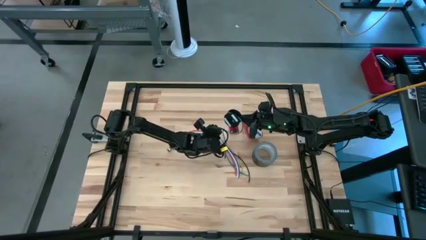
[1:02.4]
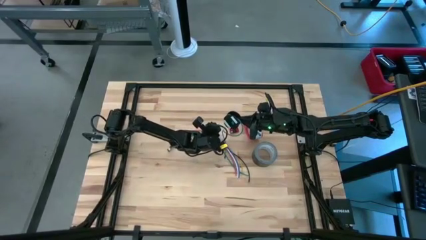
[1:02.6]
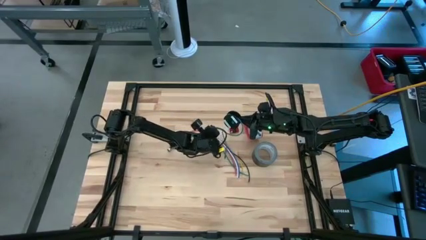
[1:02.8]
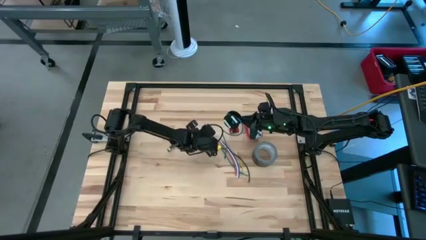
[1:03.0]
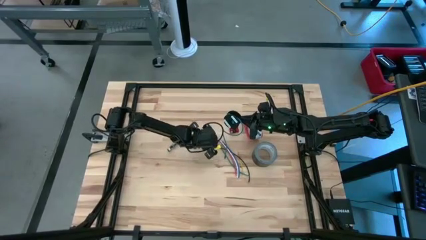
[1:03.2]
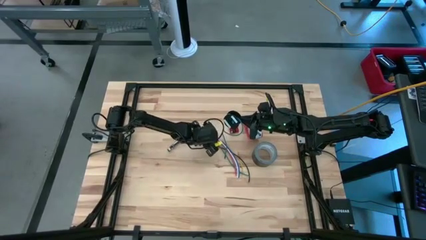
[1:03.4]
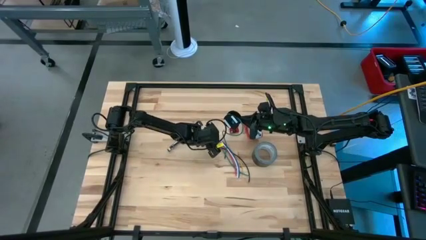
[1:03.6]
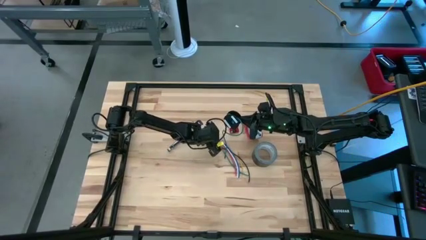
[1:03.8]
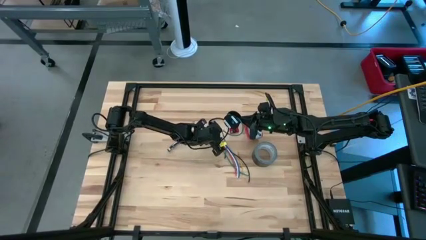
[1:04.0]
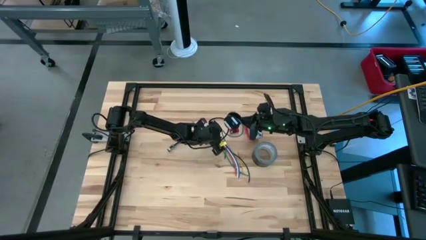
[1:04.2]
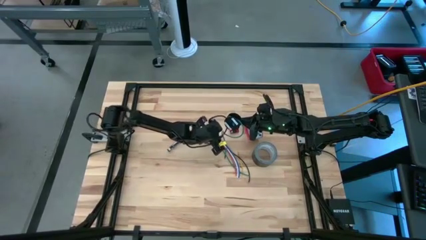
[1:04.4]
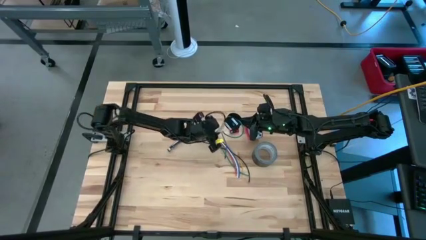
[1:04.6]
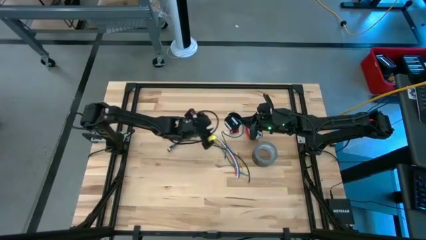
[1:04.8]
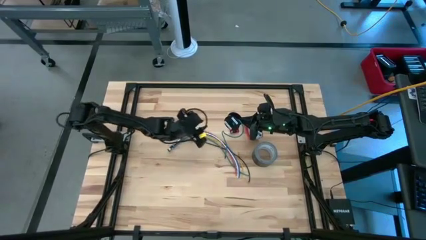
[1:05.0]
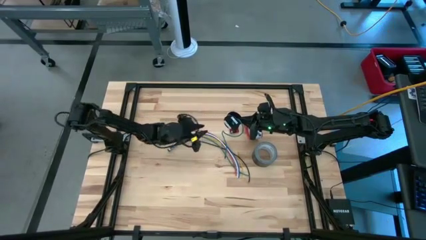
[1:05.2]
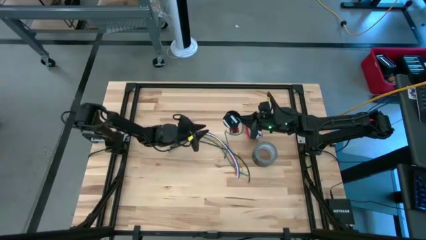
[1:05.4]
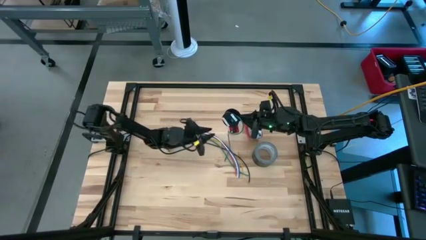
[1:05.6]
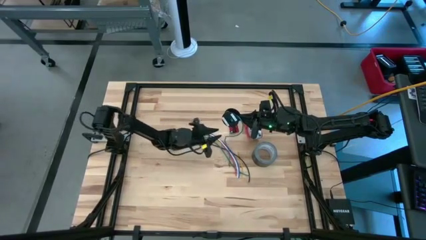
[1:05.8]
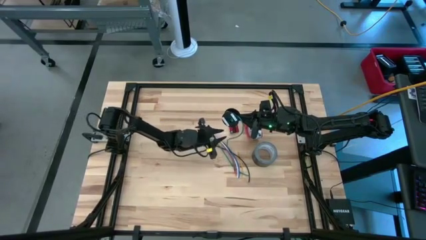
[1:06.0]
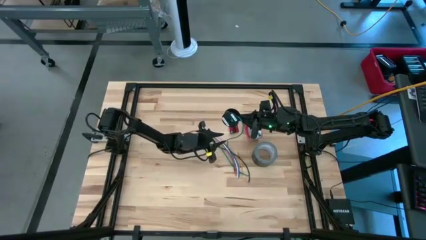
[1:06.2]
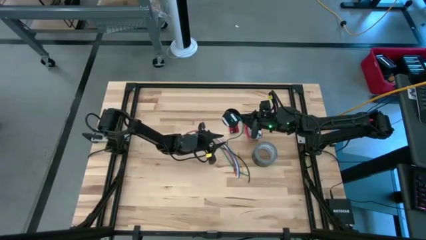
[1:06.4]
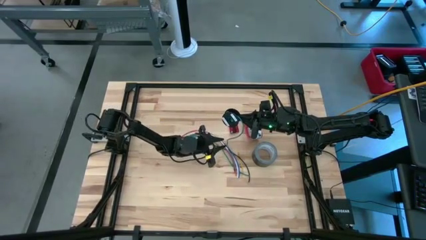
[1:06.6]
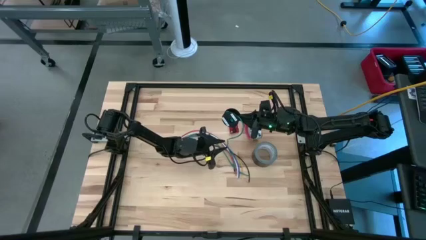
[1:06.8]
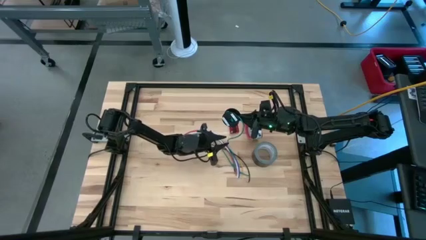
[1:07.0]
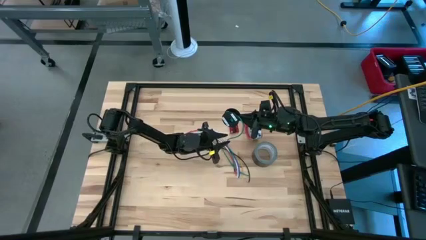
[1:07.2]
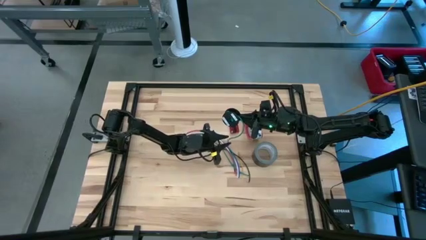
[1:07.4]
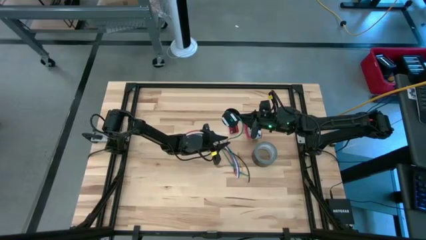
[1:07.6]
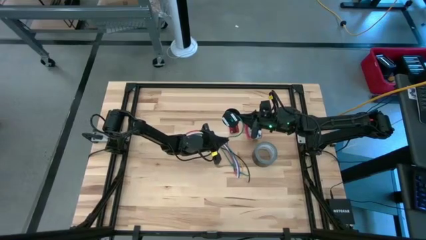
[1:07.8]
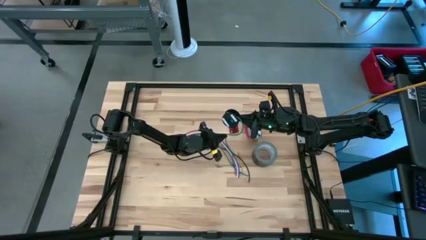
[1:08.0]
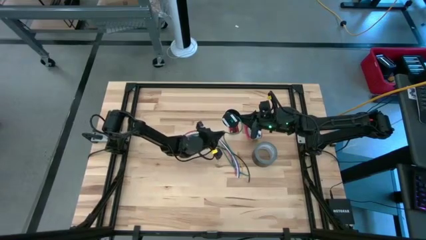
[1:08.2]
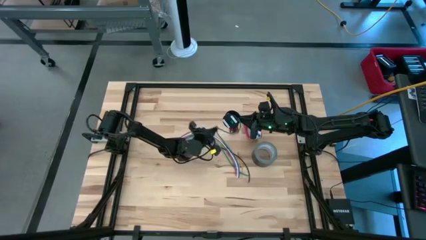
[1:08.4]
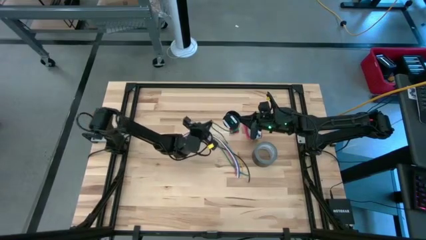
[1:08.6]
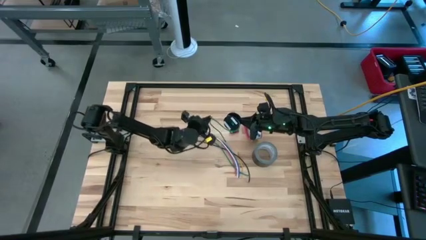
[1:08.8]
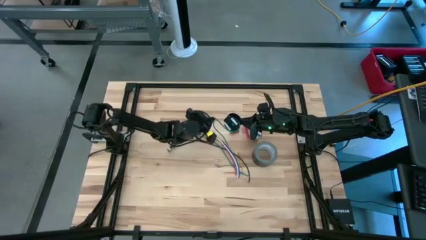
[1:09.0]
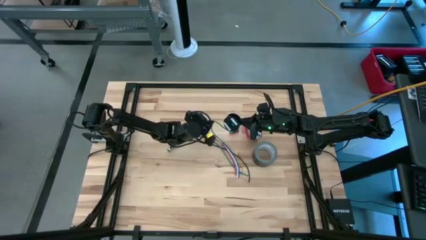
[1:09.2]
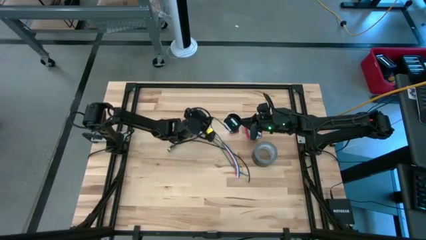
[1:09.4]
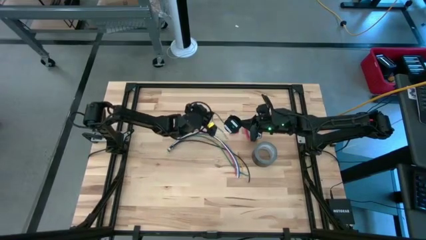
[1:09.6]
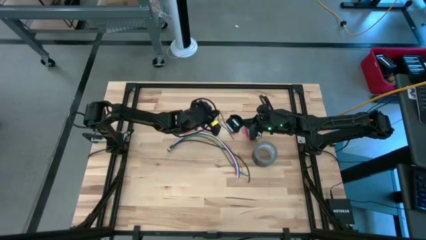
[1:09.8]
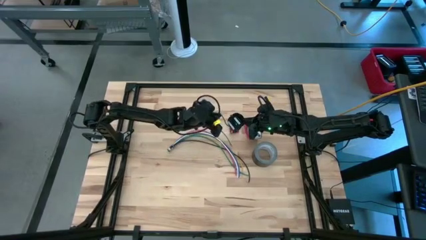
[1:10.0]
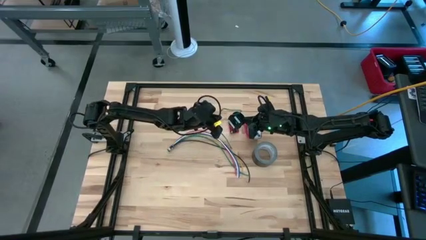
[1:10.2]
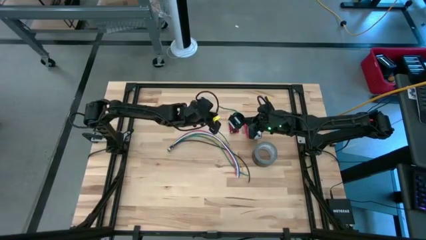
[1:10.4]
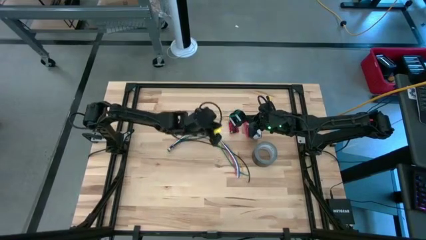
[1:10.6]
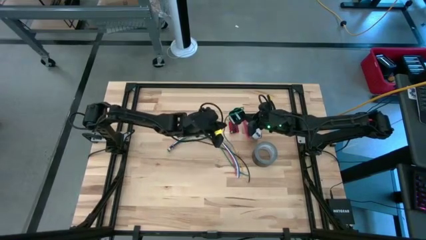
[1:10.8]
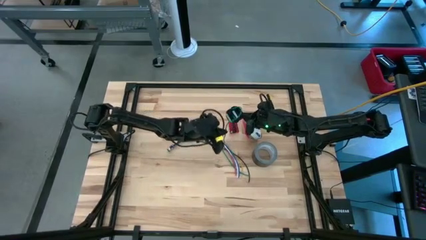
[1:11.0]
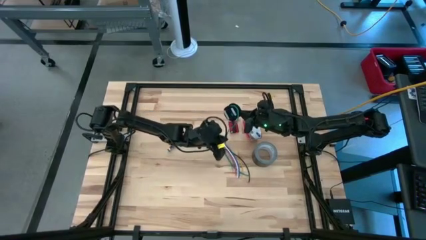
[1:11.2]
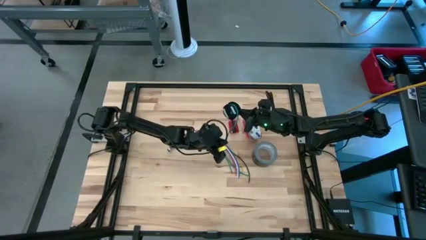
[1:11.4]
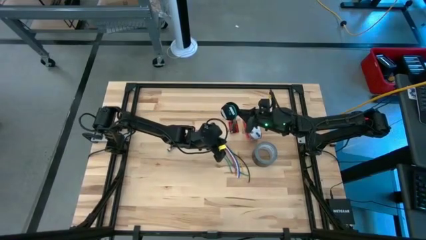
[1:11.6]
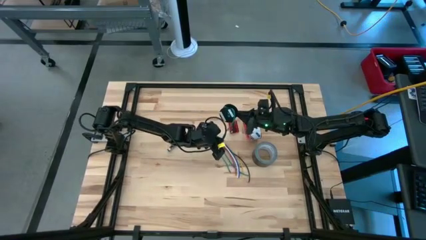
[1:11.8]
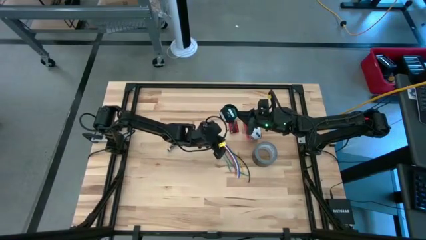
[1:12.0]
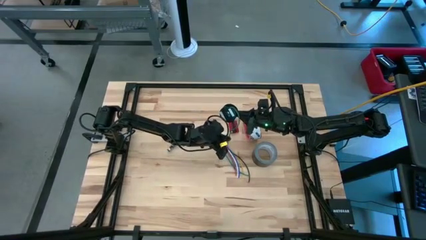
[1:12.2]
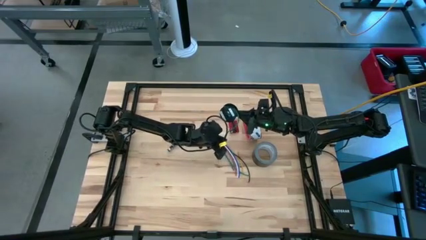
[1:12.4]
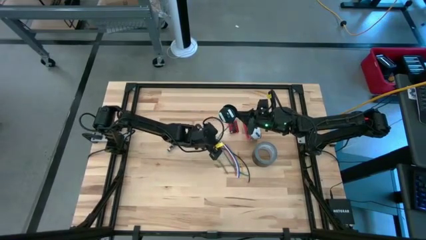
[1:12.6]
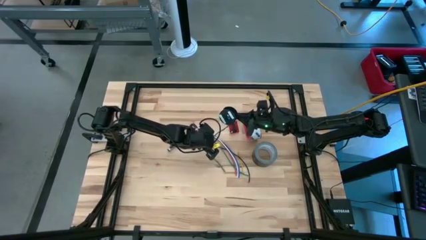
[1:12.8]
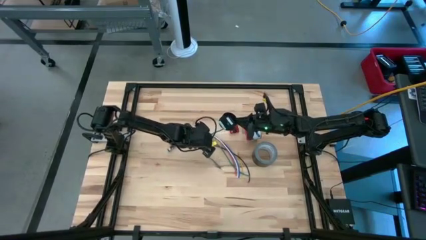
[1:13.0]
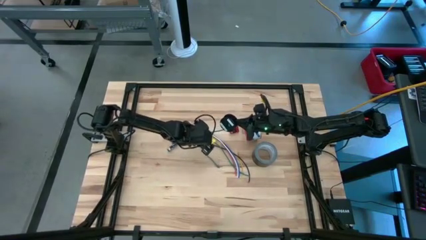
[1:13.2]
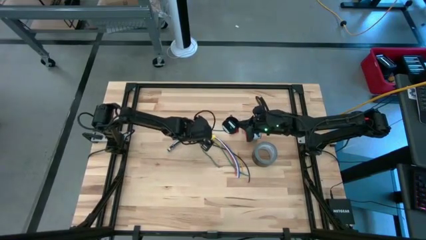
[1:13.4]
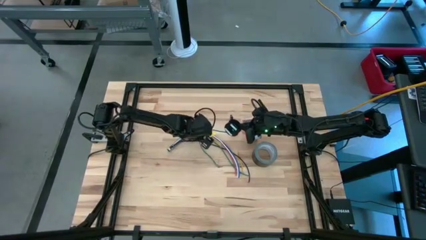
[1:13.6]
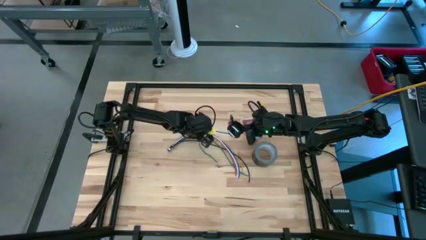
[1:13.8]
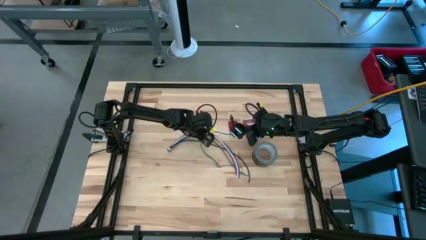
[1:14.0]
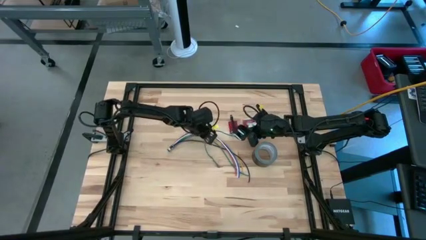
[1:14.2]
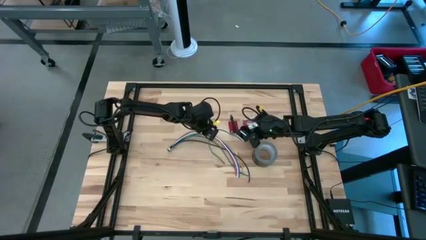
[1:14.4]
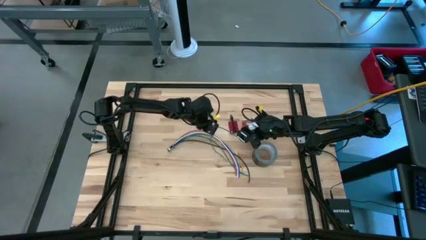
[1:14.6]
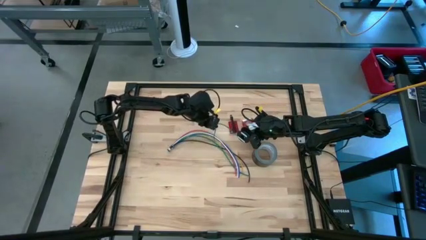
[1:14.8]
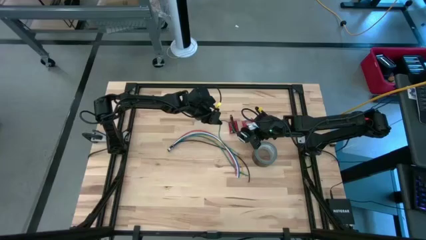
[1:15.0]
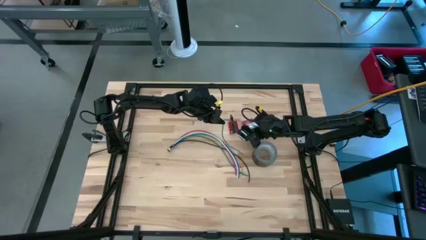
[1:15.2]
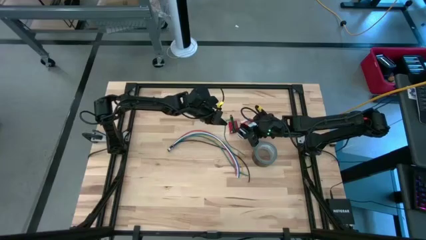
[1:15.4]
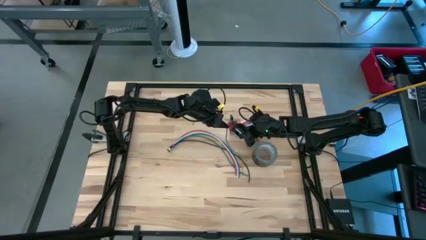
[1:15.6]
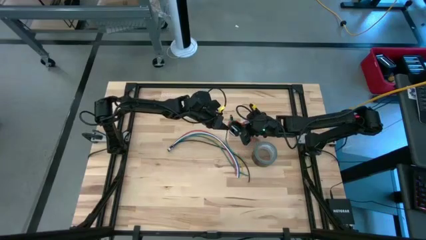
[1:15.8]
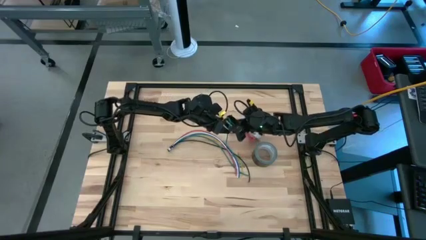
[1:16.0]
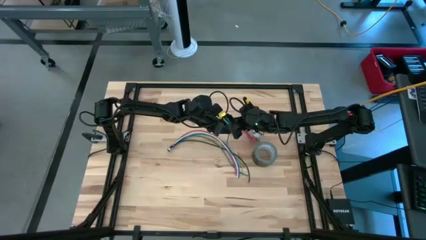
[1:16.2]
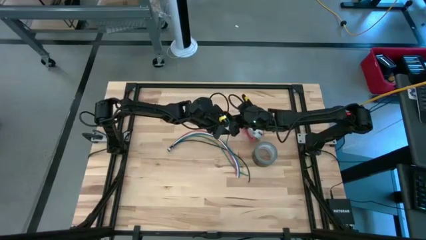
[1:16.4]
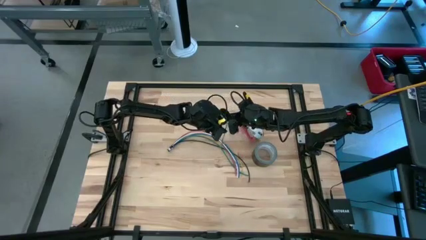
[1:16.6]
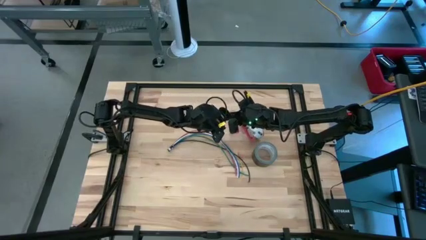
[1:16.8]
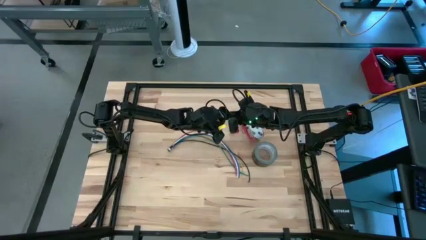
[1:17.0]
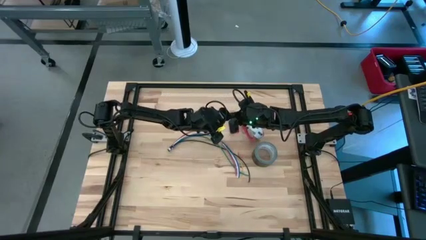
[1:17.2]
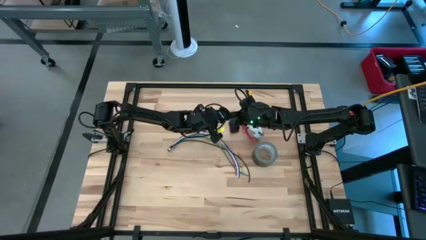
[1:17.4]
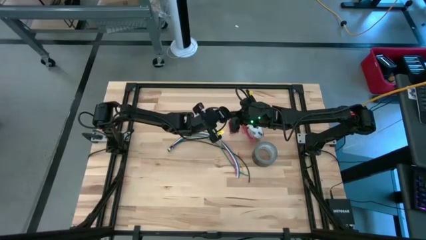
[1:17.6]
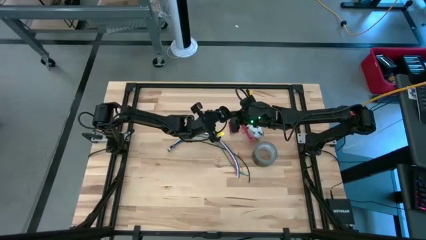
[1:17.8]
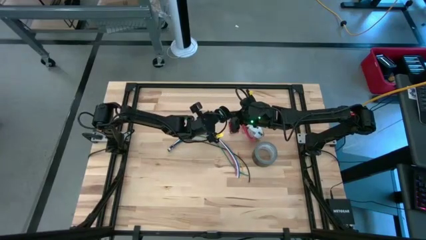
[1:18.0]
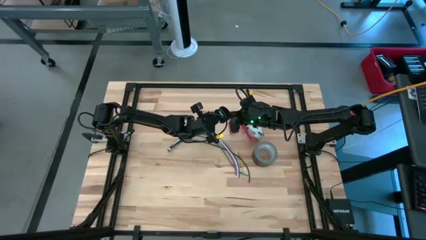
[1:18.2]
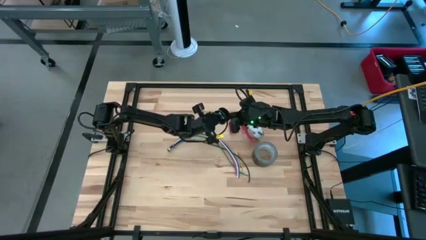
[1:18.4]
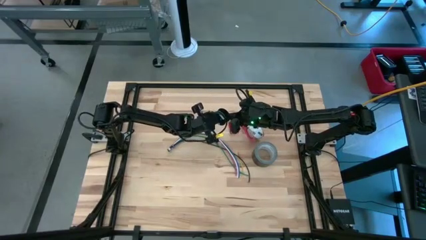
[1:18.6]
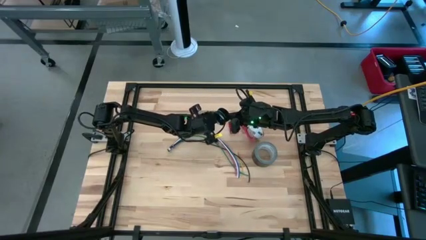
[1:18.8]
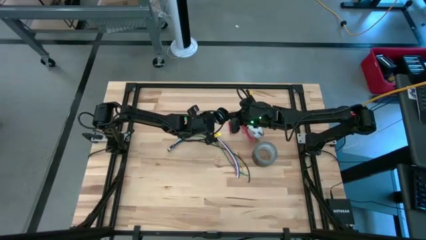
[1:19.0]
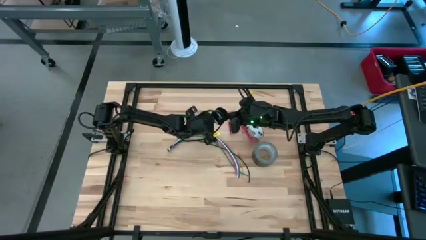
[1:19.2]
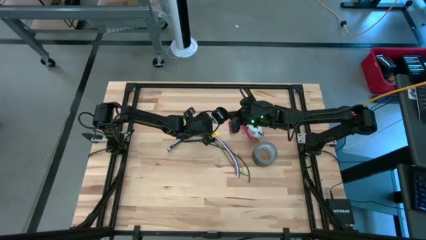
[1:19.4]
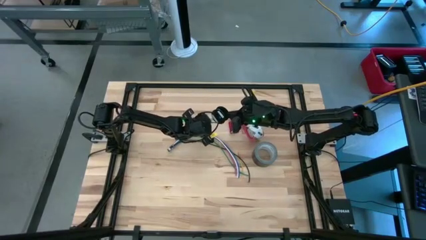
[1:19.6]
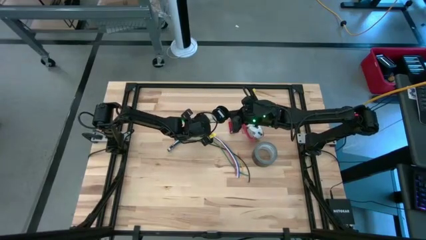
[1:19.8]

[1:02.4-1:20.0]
Task: Coil cords
Coil green wire onto the spool
